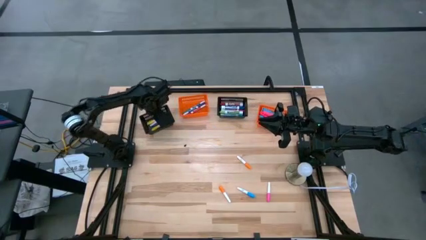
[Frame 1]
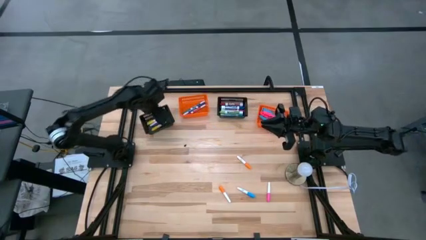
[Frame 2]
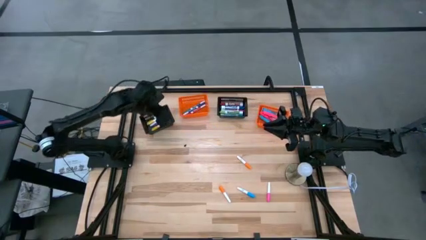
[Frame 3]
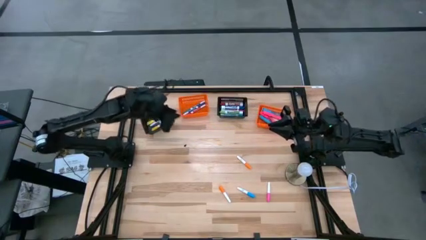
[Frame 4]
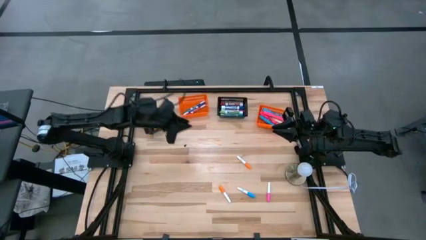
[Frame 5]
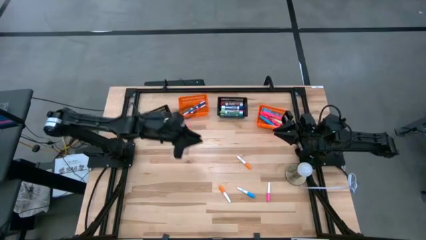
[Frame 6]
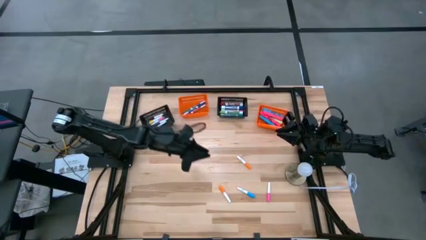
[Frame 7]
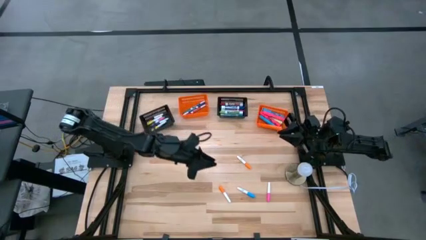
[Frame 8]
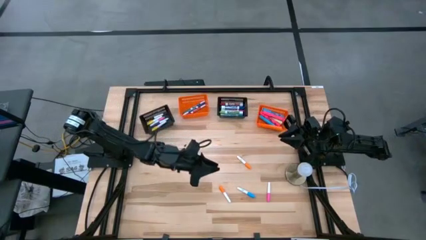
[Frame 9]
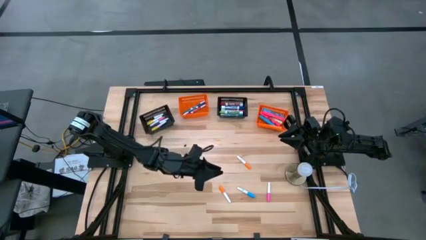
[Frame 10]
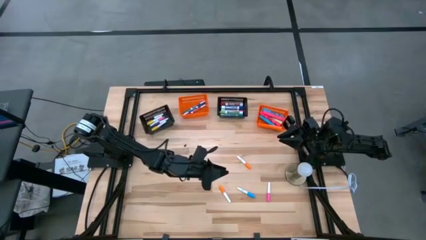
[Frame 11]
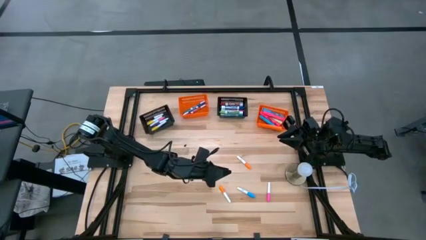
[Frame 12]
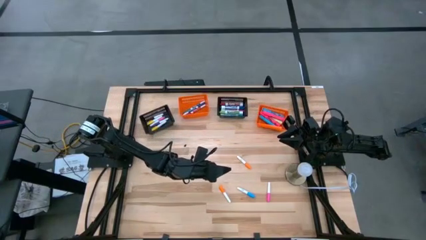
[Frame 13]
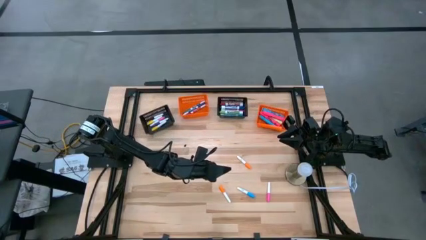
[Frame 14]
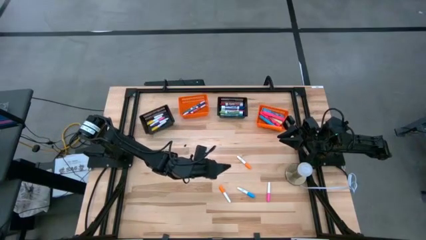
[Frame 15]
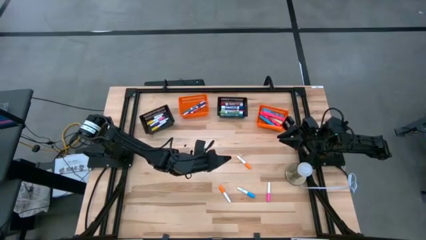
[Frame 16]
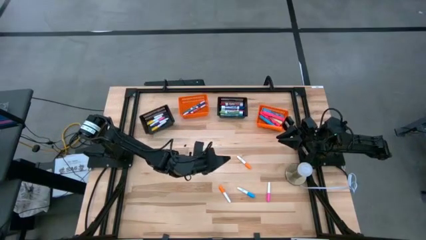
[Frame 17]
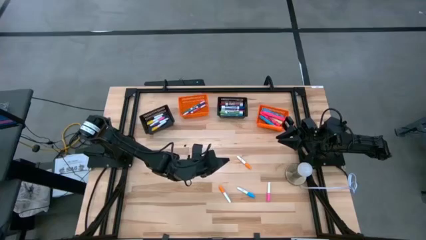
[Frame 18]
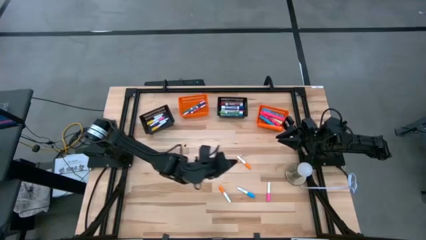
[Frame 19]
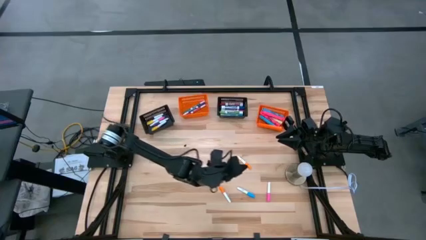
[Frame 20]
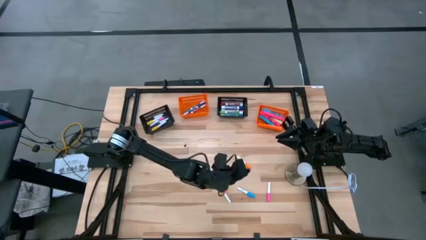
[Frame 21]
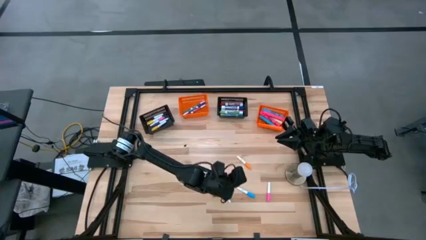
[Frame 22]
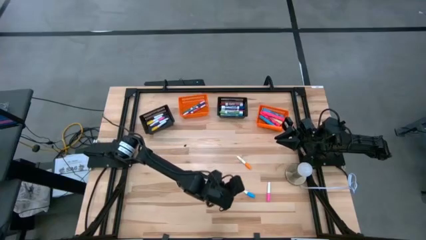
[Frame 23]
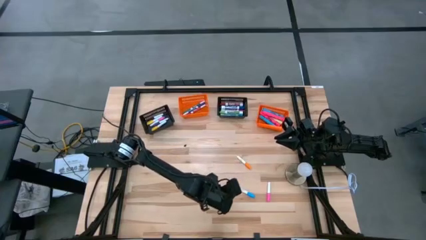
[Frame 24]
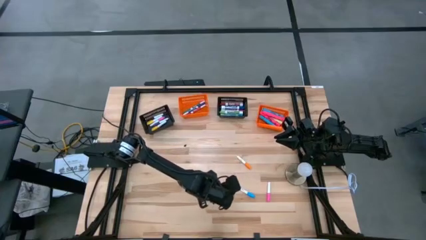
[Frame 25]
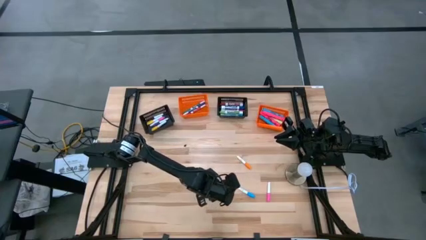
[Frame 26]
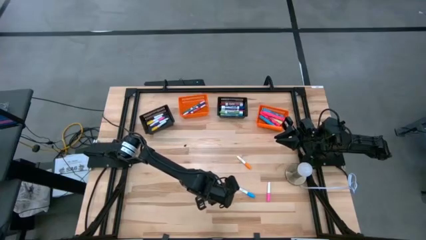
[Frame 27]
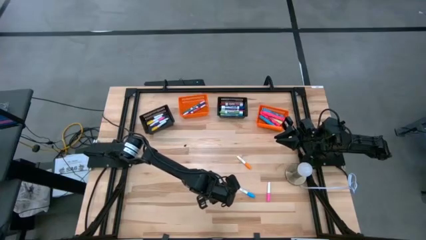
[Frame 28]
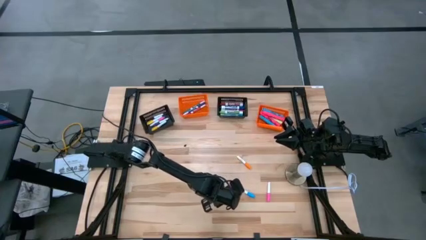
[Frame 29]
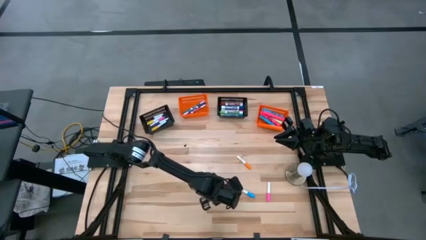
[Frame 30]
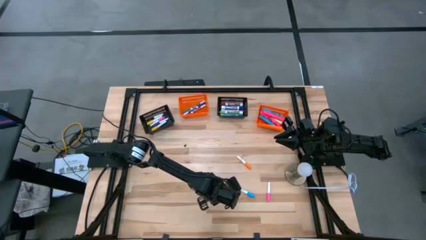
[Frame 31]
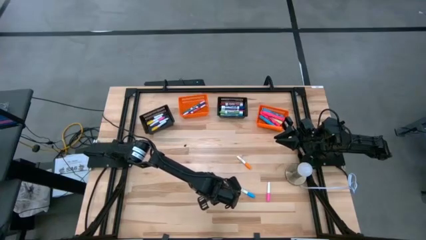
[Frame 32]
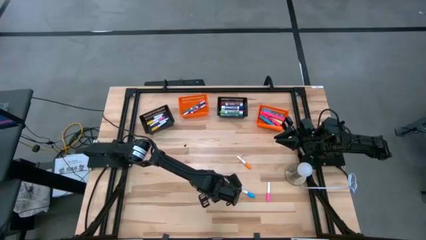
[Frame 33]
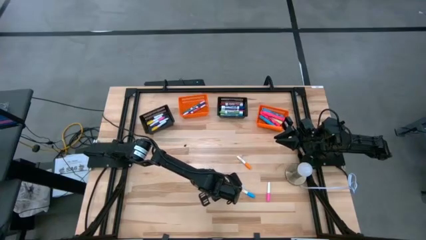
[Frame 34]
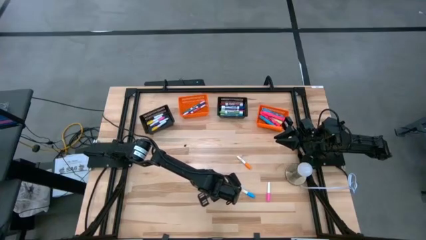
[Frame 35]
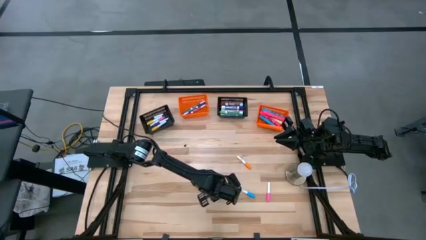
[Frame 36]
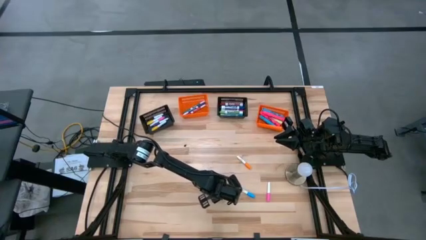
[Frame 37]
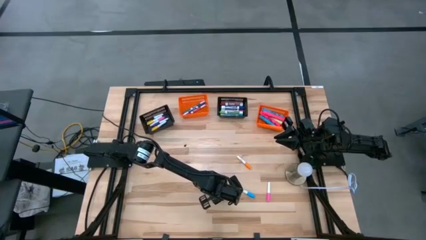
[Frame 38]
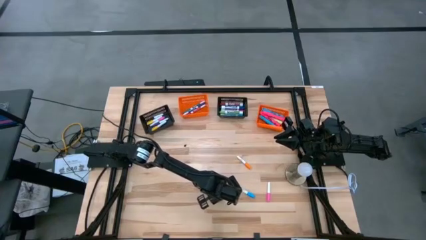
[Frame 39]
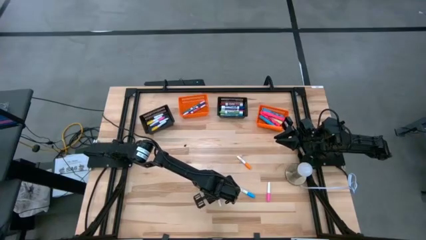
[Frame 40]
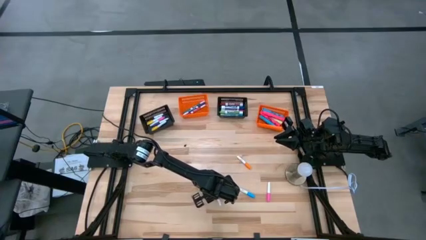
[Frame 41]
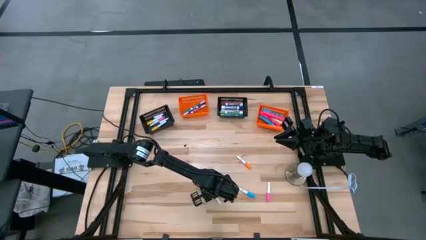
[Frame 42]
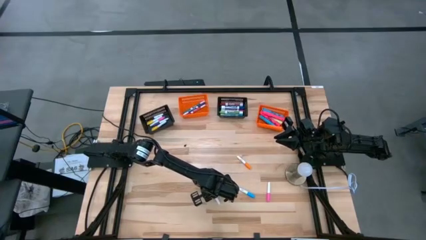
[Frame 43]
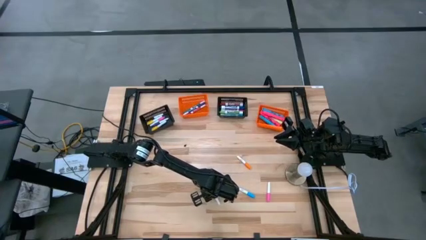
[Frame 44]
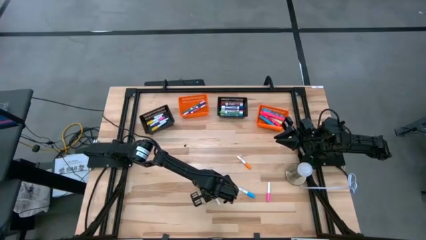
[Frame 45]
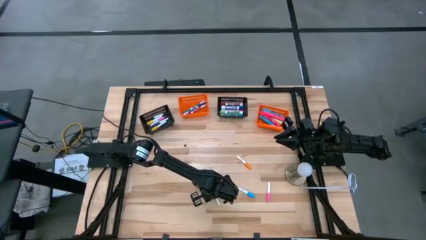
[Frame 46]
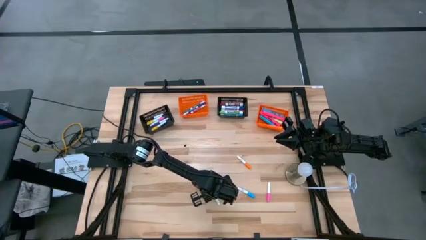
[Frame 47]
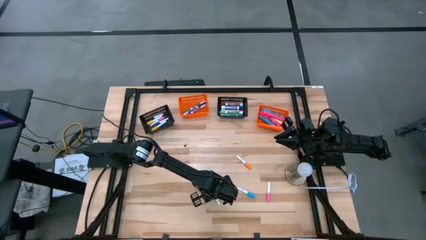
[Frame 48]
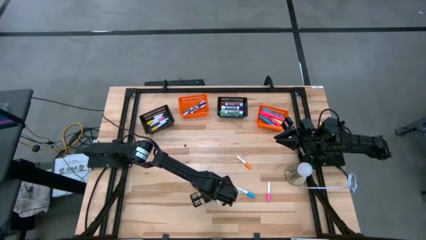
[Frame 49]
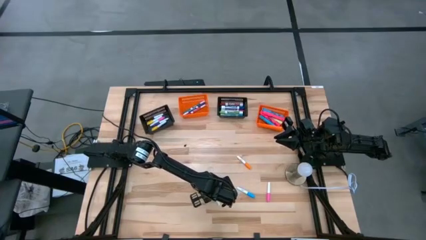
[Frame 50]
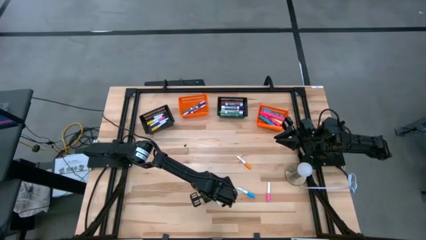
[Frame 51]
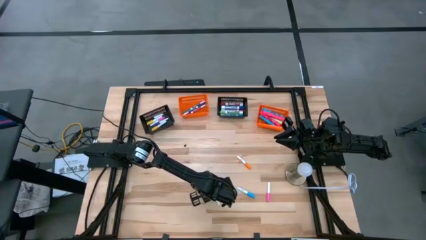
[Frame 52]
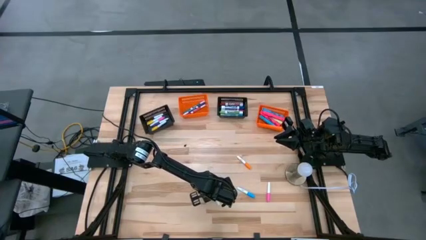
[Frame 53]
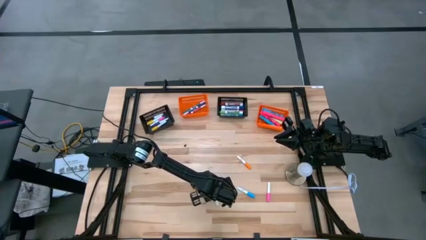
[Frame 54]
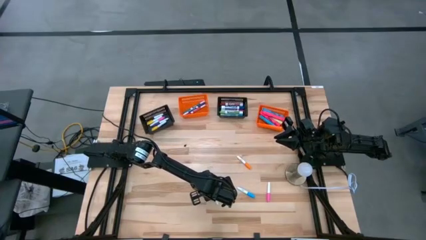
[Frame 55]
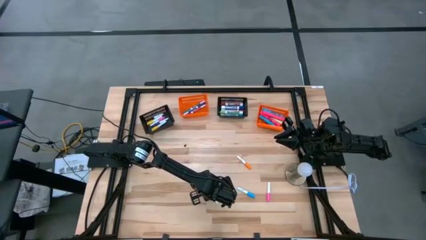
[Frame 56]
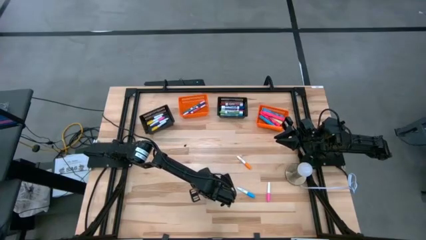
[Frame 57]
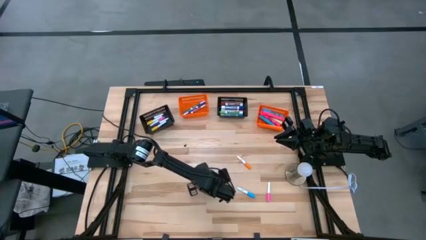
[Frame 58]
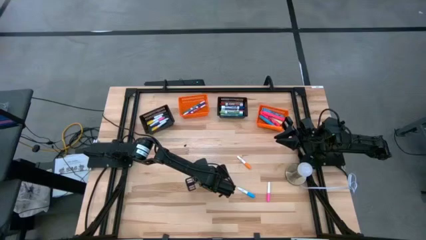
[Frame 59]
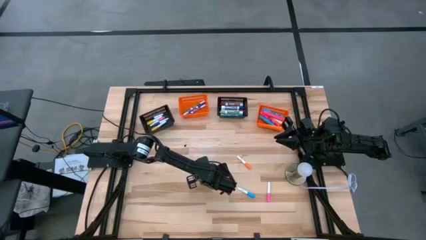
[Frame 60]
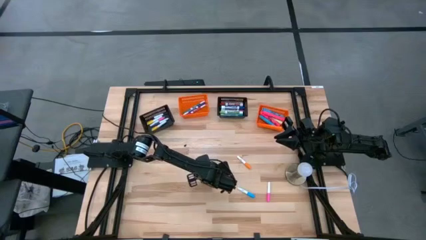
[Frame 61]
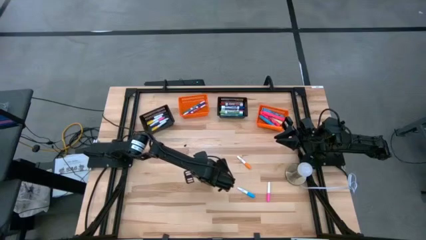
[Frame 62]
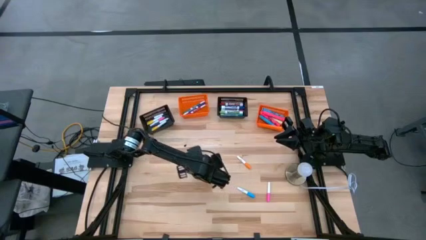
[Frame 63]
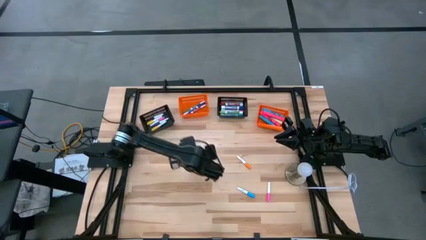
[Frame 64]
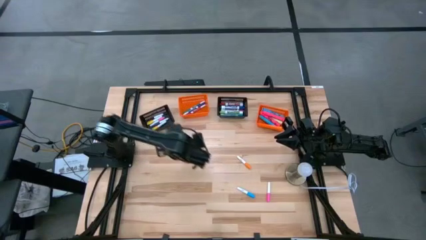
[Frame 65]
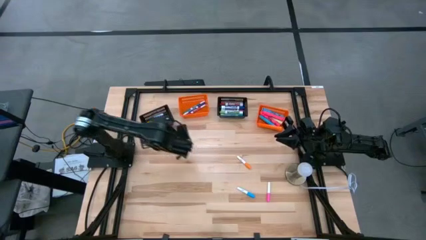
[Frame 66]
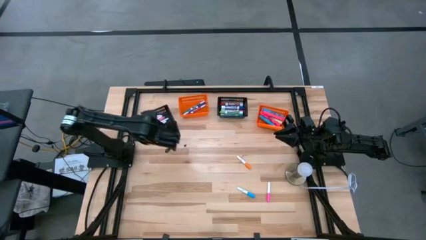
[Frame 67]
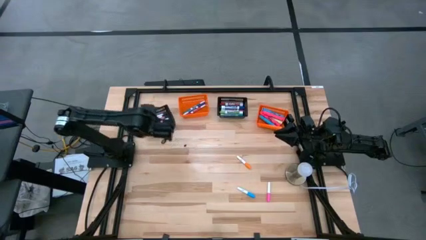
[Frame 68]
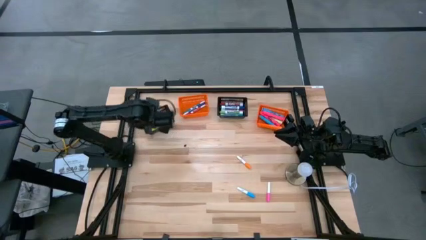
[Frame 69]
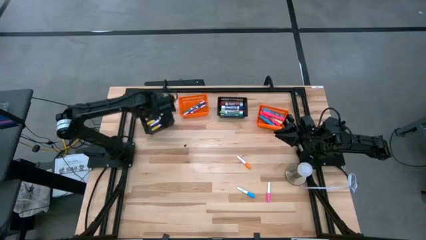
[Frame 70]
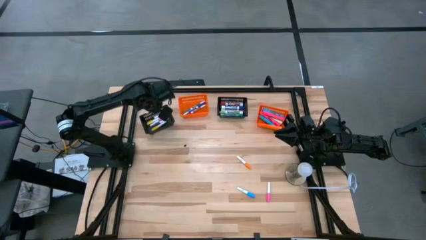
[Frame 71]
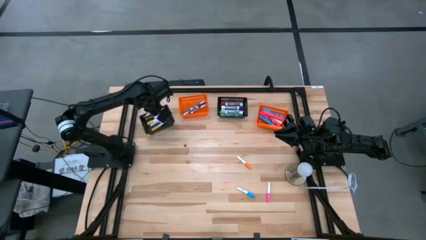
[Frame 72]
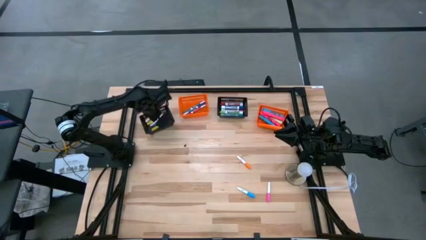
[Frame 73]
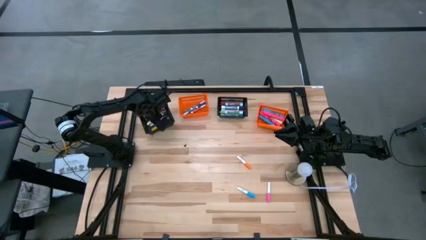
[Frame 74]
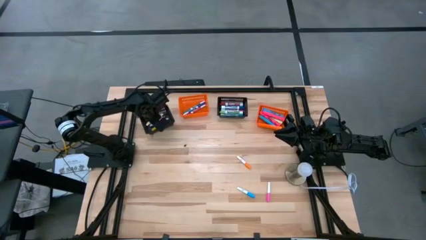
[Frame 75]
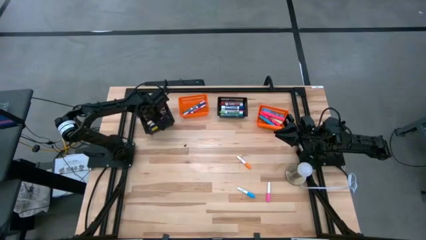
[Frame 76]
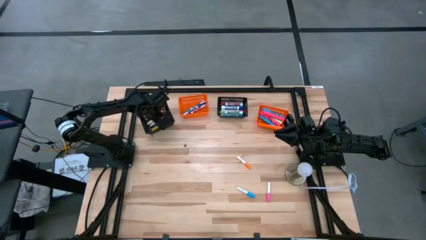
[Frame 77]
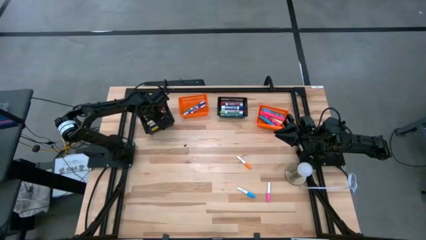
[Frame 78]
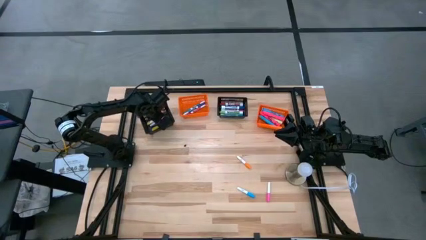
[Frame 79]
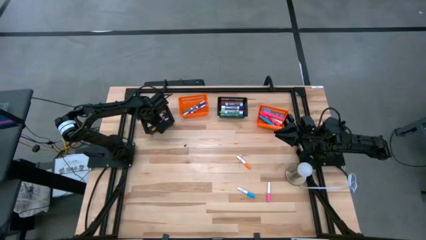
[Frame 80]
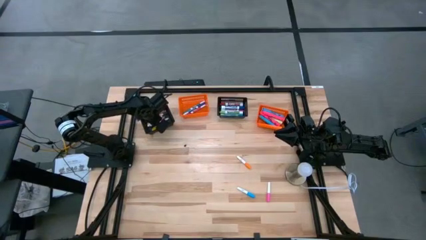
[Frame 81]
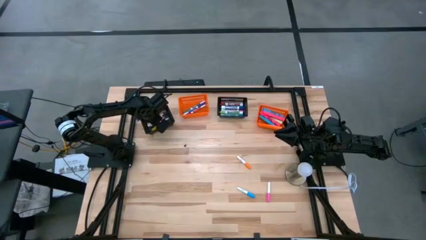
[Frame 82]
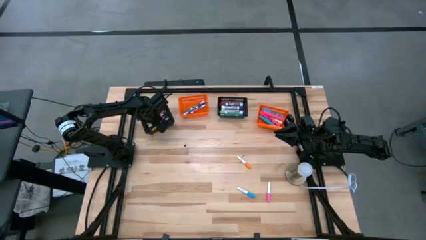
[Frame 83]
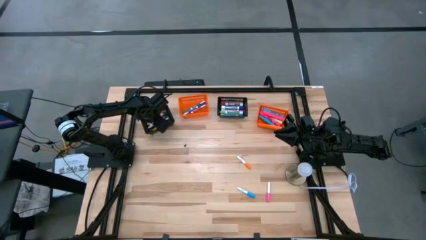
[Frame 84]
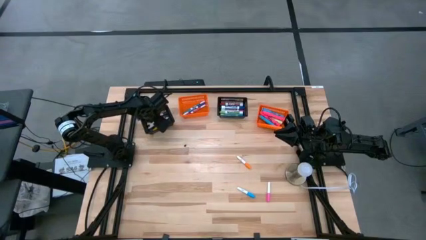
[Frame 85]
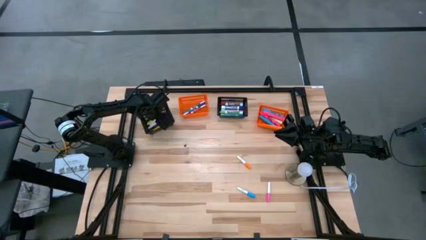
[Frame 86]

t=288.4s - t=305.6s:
Task: Pick & Place Markers
Put the bottom white orange marker into the left black bin

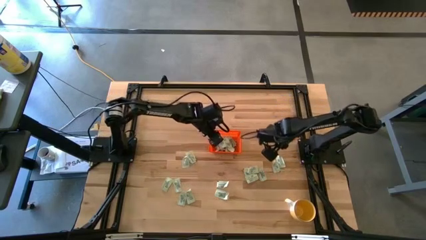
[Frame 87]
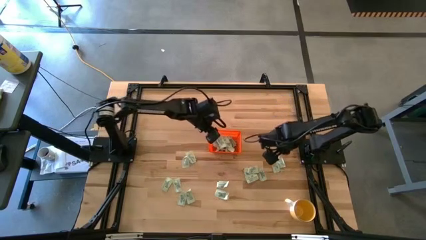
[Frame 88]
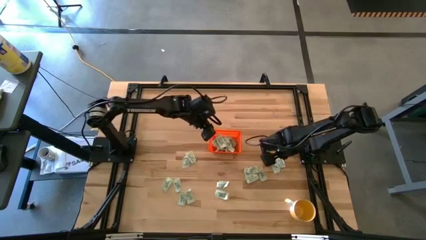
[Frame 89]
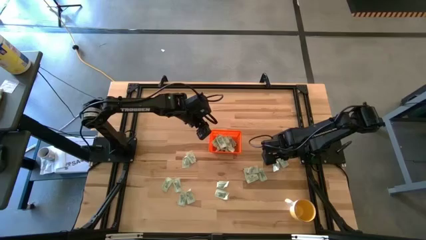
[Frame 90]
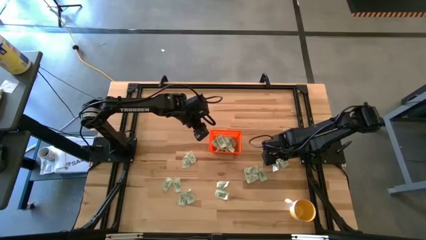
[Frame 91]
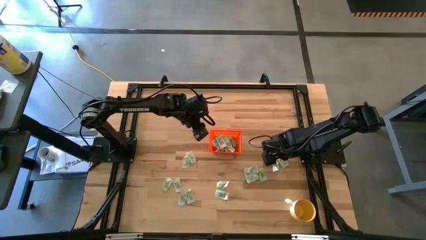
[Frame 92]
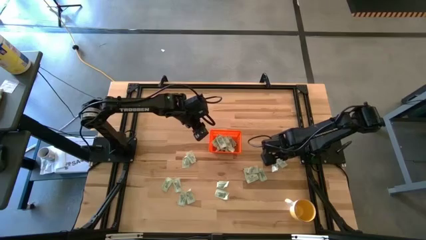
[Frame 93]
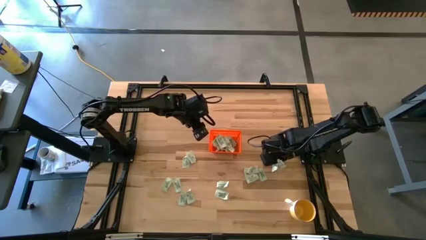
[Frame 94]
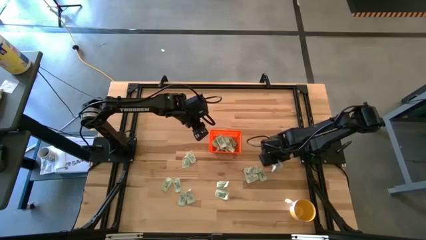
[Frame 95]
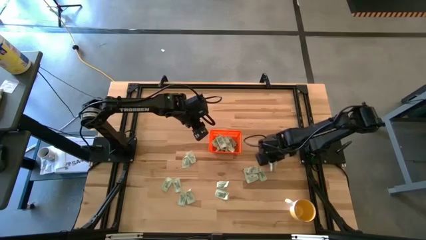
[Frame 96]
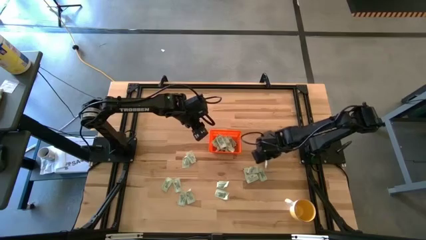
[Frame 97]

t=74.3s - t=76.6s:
Task: Pick and place Stevia / Truvia into bins
Put the light green stevia packet into the orange basket
